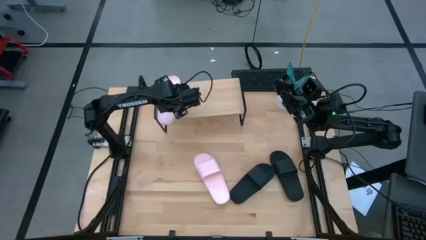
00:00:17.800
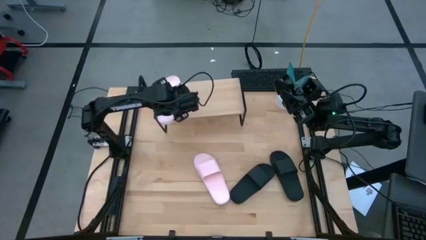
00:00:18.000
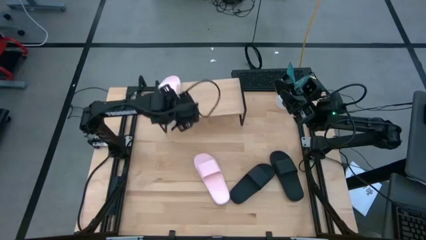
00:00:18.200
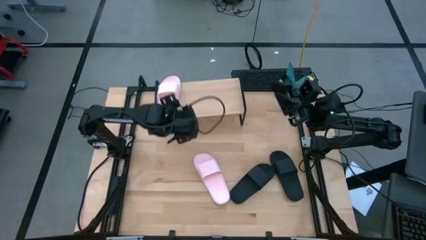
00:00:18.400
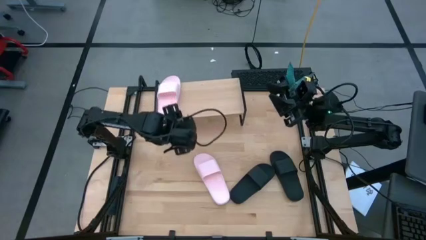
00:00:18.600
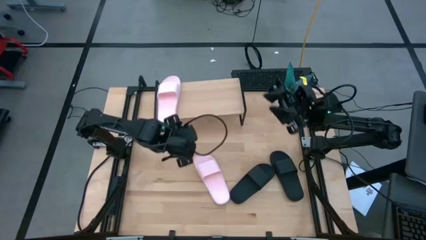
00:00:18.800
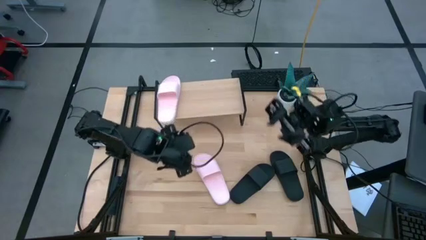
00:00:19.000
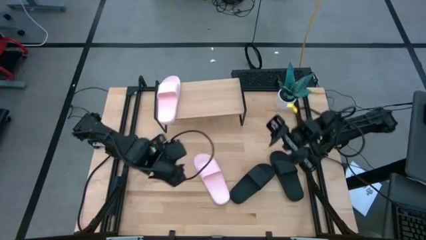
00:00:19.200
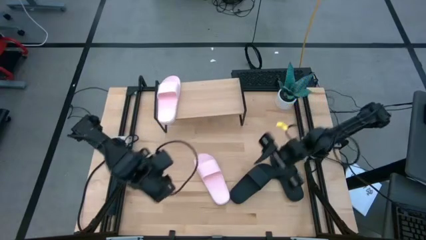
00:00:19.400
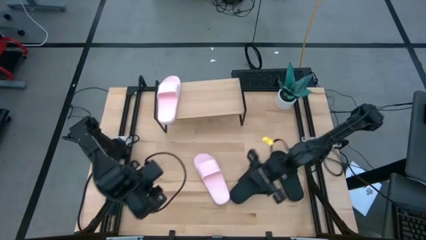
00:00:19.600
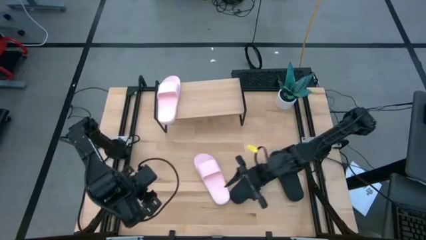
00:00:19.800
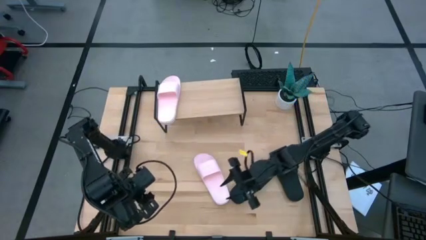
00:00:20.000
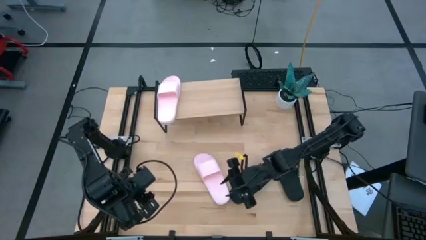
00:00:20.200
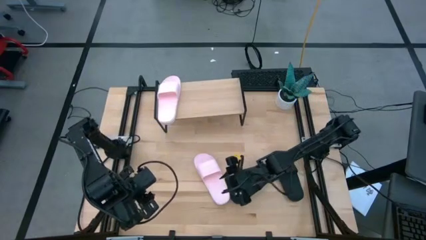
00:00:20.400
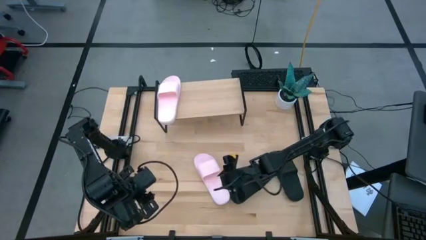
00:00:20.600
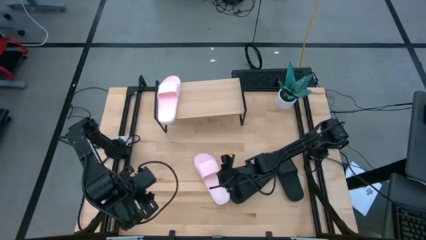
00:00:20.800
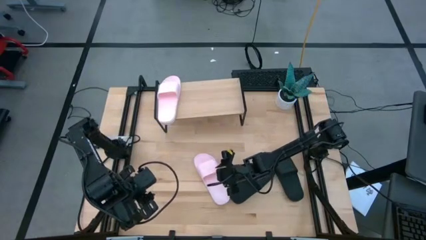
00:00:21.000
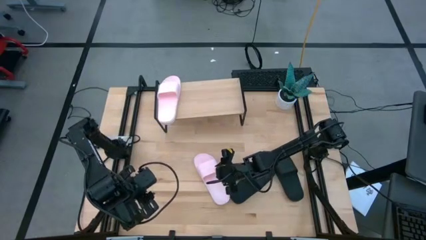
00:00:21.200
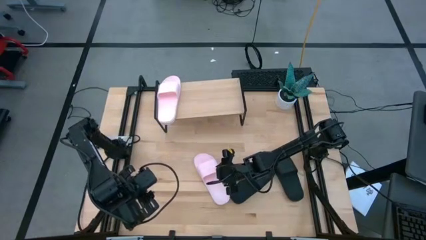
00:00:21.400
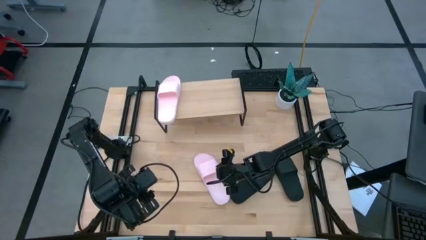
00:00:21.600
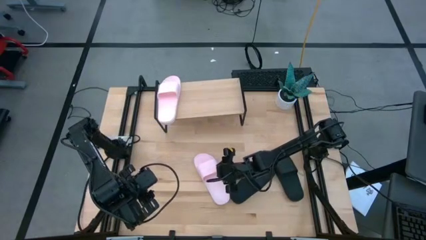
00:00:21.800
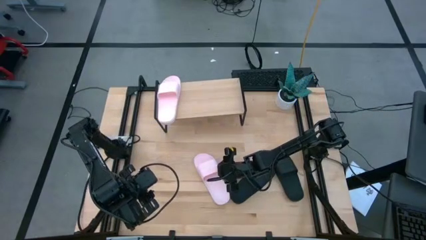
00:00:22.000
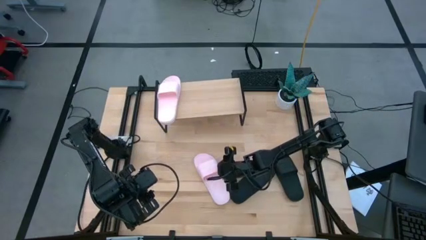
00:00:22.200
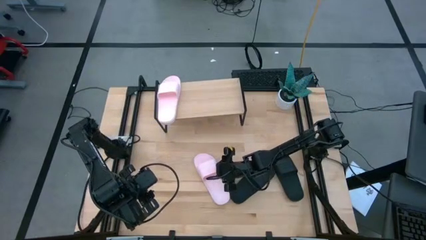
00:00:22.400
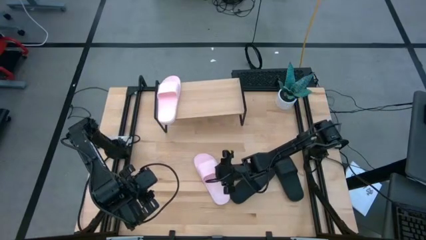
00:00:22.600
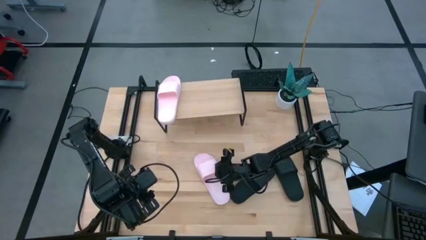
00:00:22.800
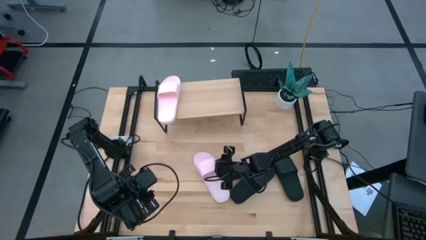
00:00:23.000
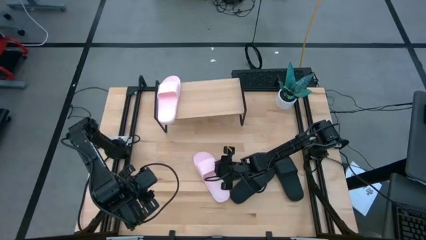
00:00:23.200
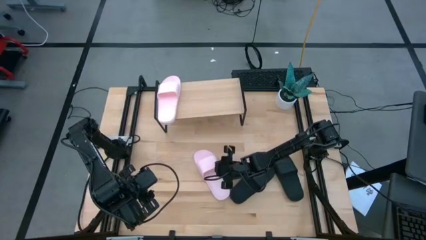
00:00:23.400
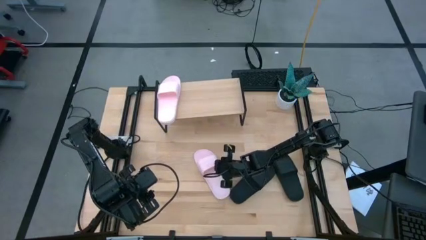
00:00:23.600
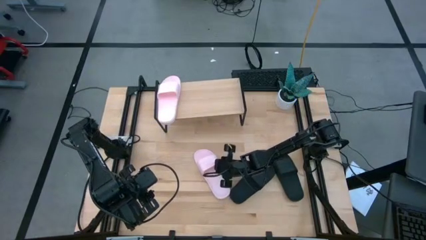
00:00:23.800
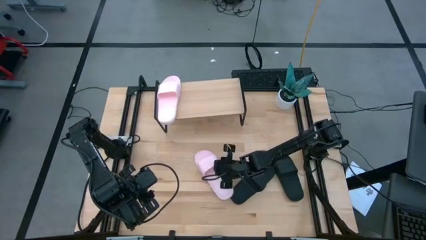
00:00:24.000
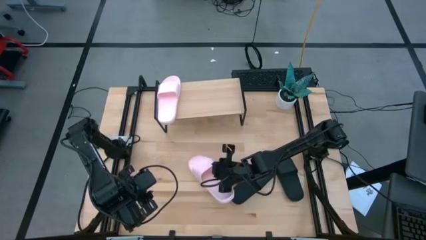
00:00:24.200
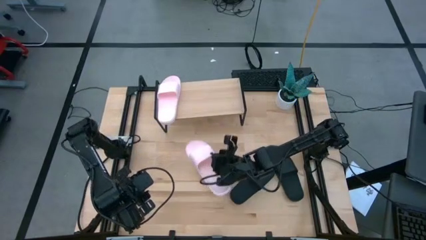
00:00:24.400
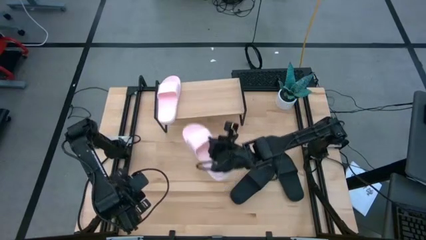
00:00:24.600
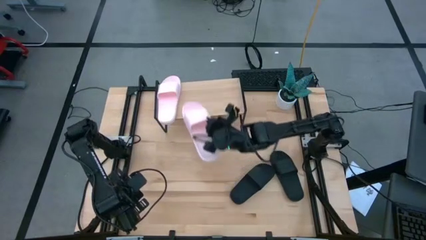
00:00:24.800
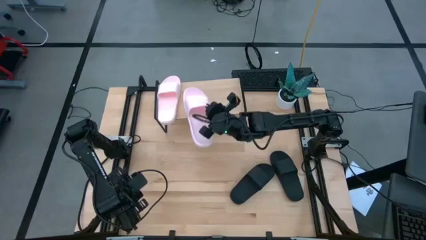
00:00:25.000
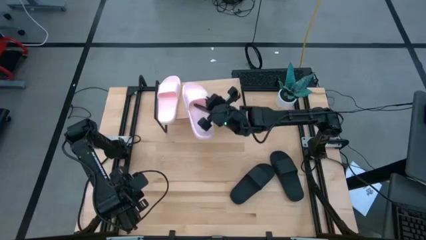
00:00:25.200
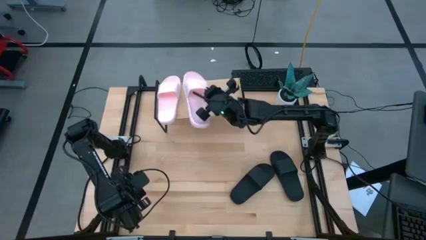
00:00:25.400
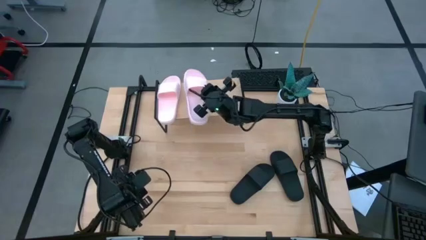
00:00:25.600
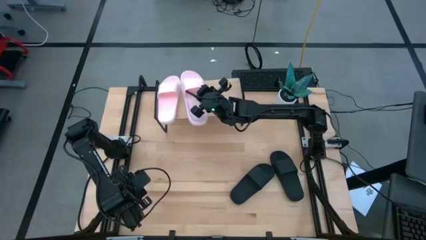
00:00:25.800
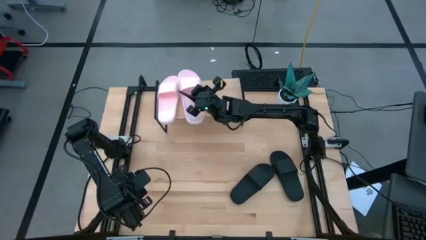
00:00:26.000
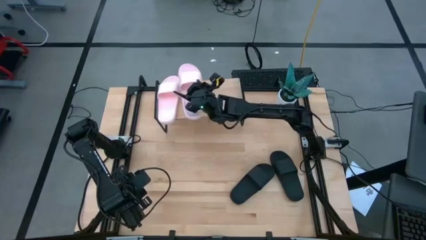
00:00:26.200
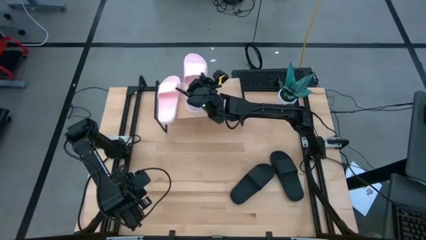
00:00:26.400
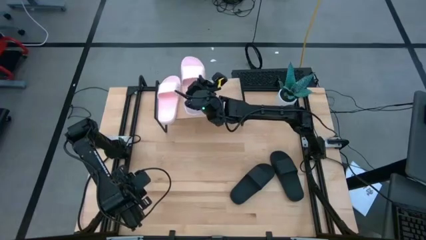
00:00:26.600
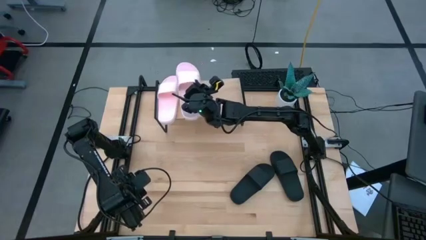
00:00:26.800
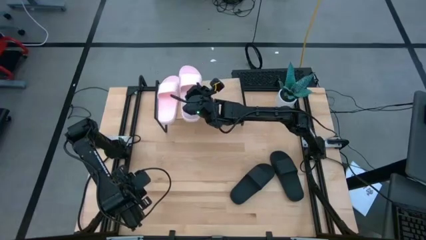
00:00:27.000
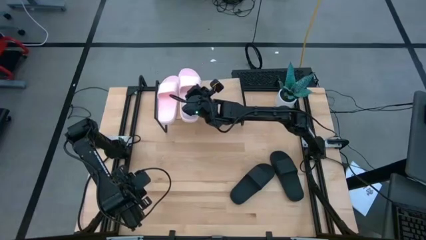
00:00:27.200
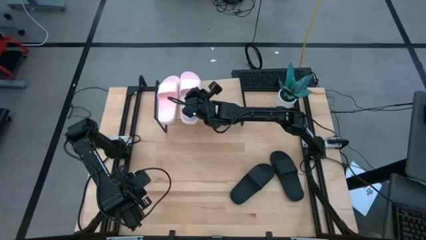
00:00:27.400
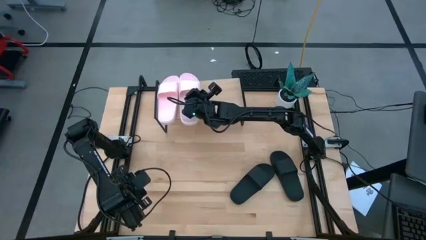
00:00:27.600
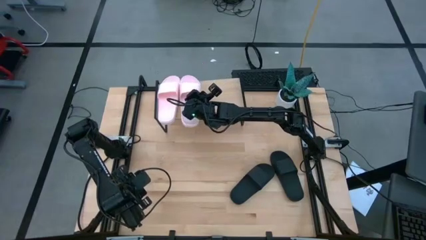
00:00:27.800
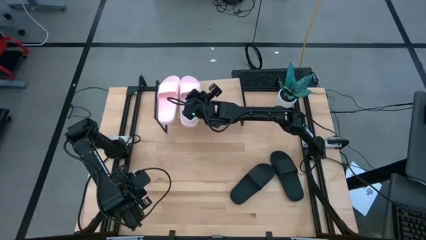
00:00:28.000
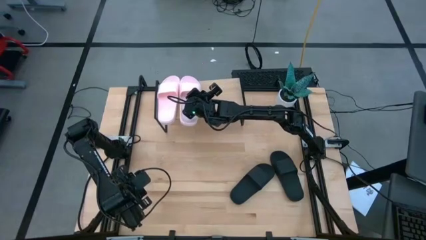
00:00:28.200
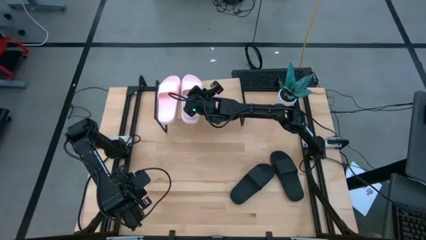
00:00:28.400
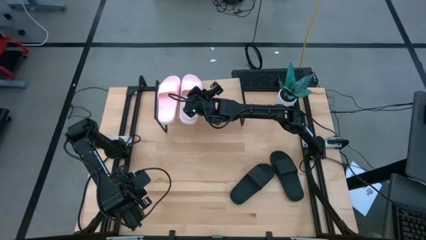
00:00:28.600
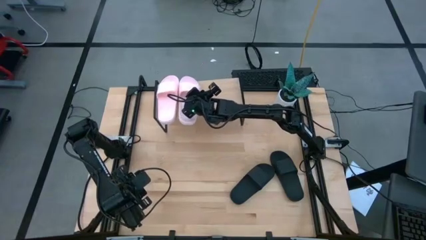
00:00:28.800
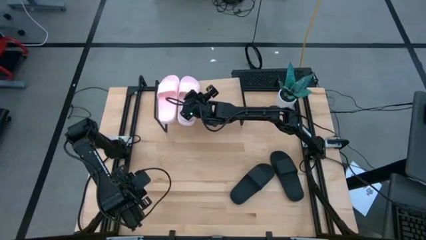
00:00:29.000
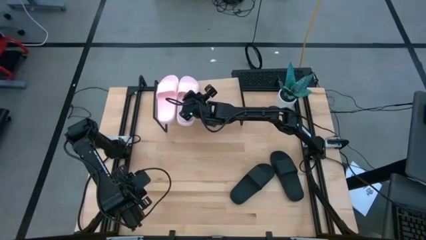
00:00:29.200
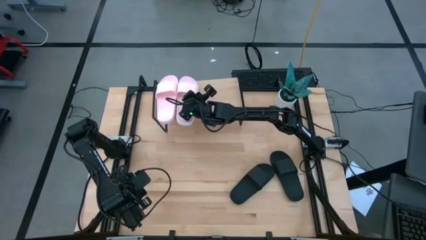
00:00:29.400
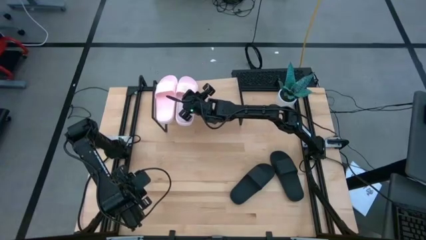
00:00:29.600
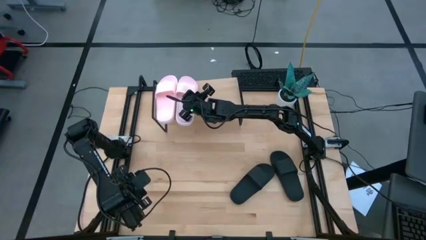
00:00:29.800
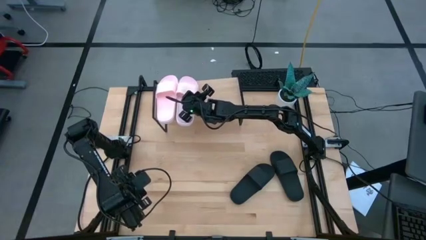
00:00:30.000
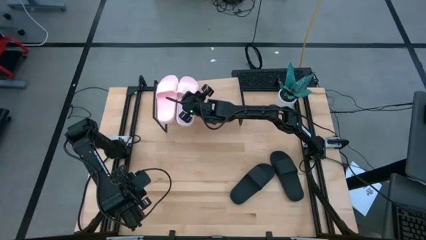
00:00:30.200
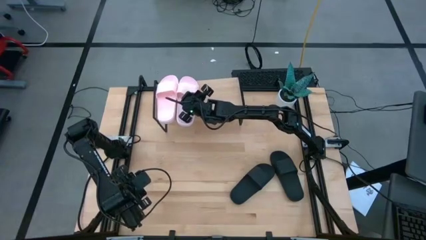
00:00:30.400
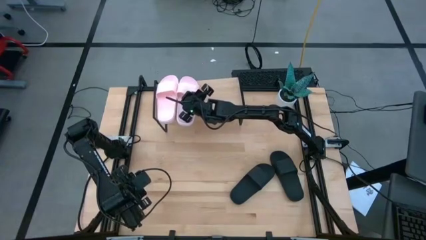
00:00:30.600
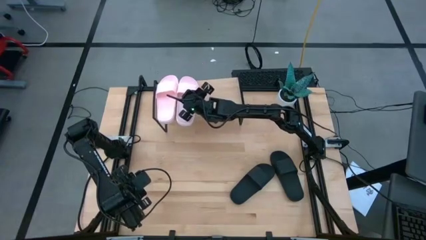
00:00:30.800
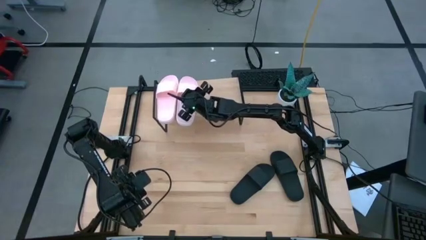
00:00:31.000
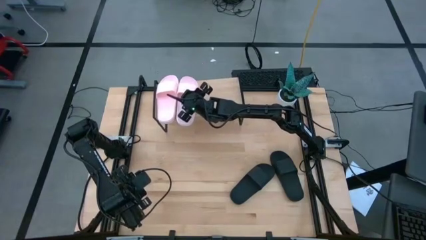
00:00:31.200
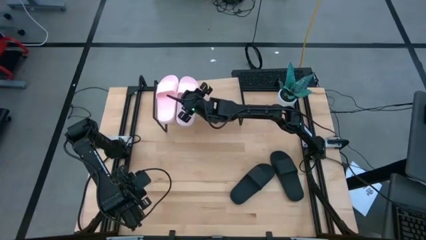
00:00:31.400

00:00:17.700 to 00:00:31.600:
Task: Pick and place slides into the shelf
Put the pink slipper on the shelf
